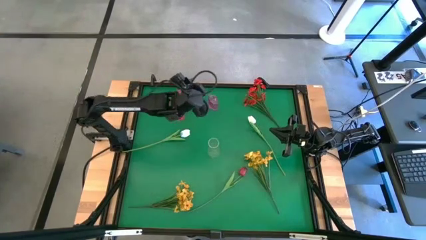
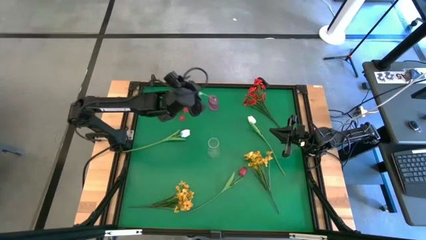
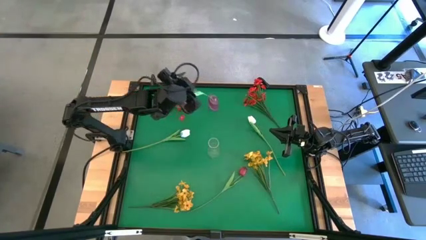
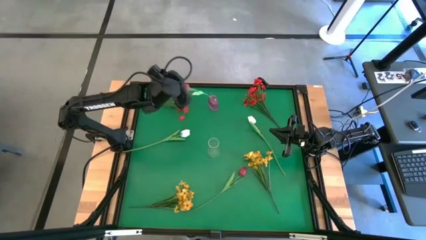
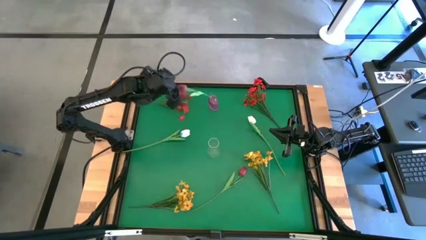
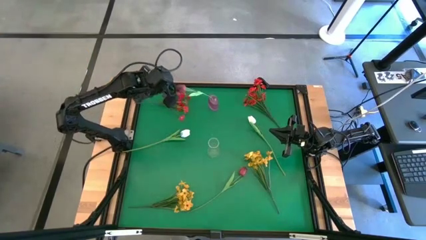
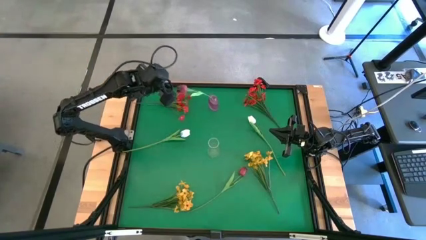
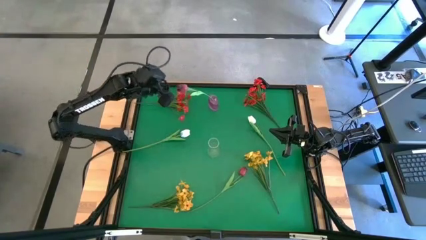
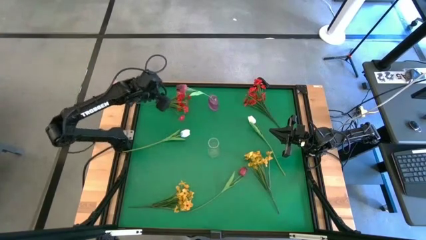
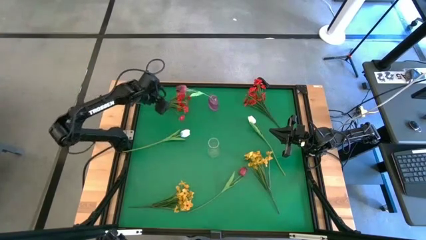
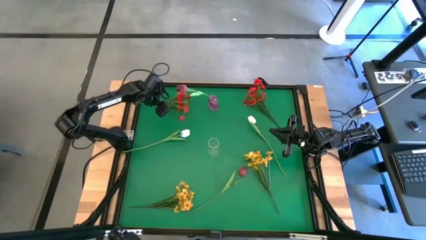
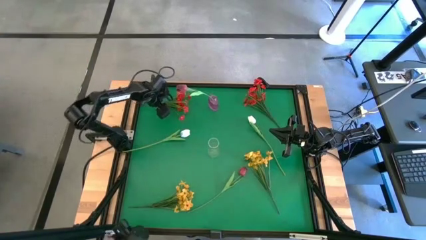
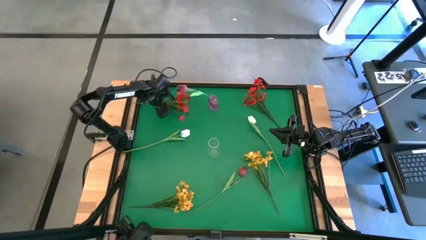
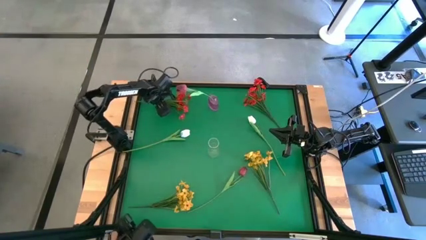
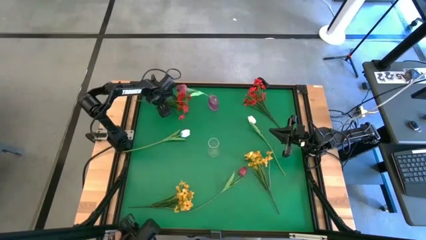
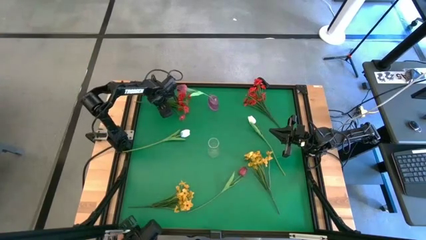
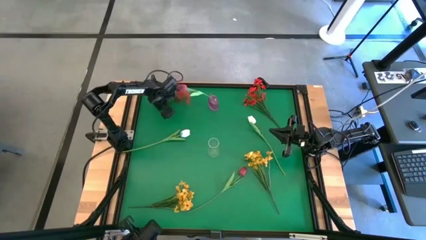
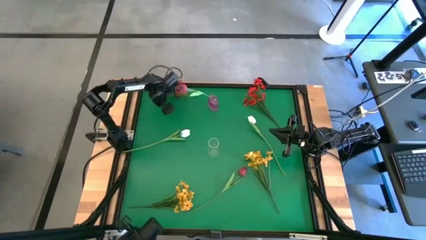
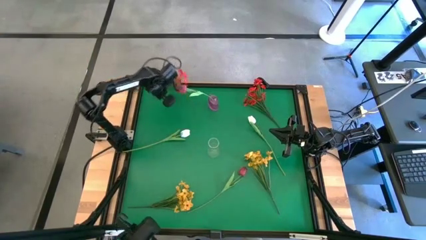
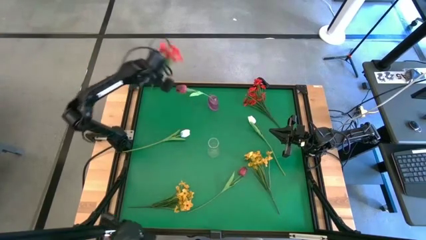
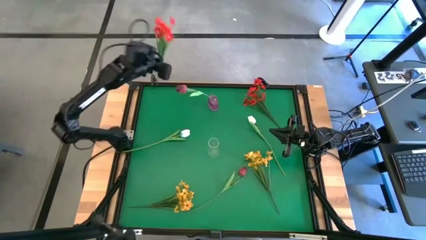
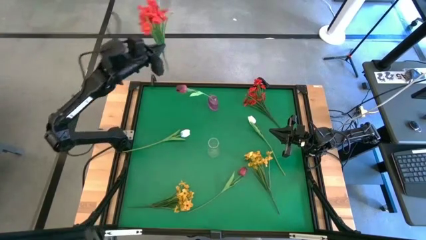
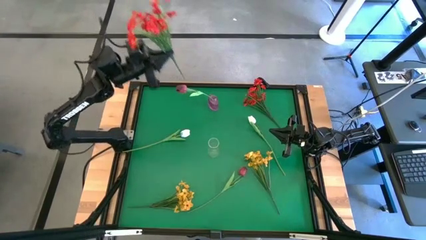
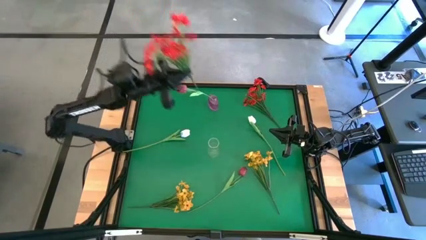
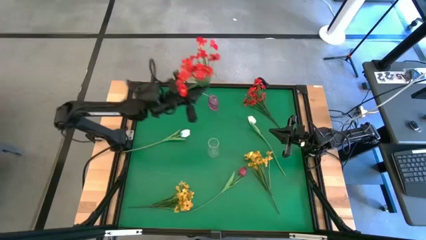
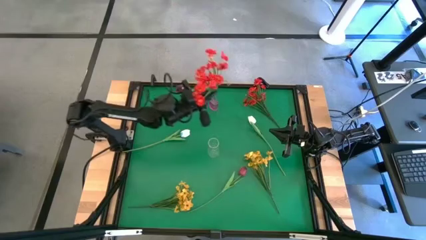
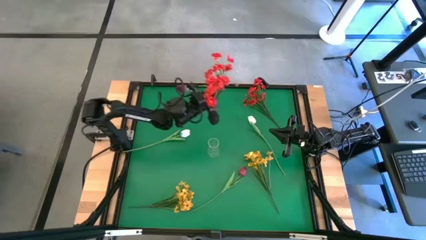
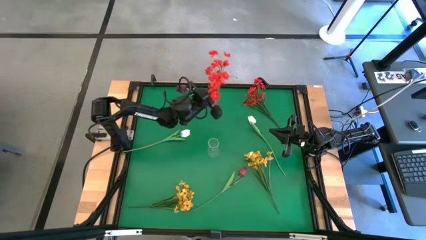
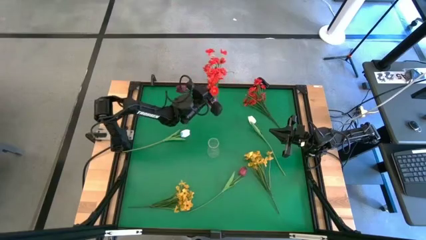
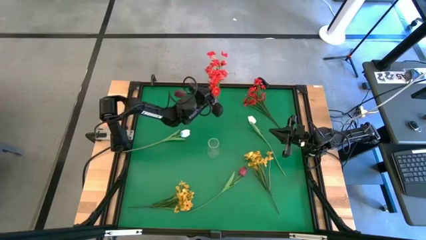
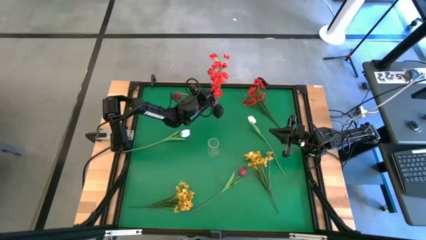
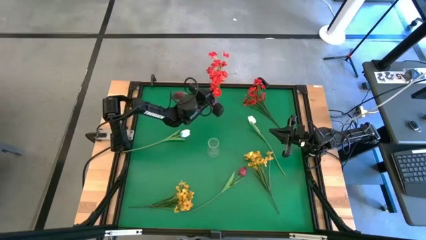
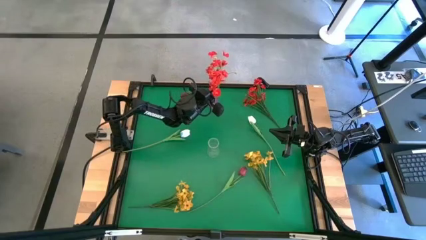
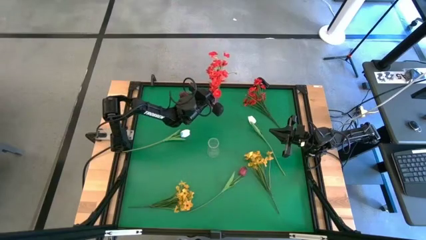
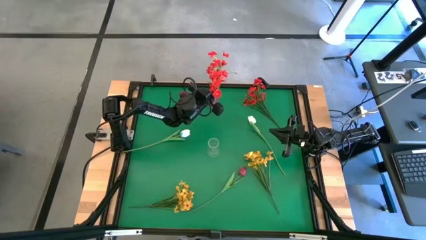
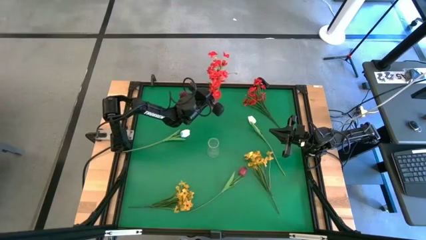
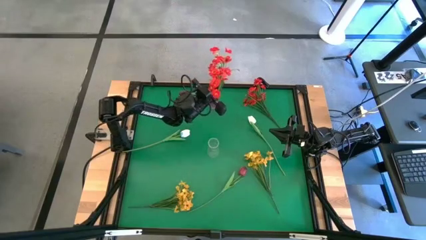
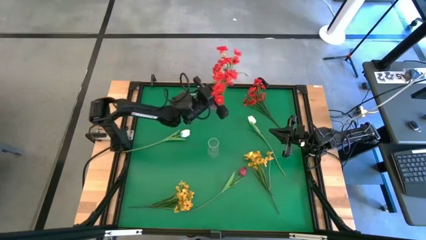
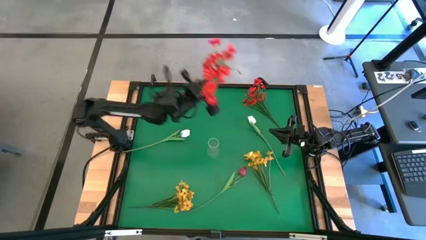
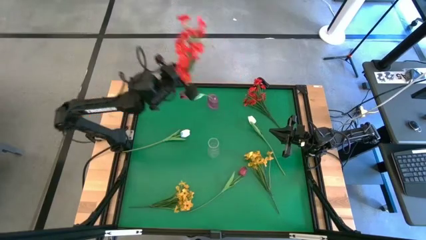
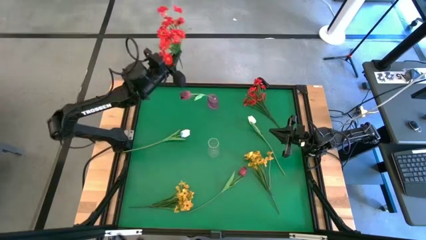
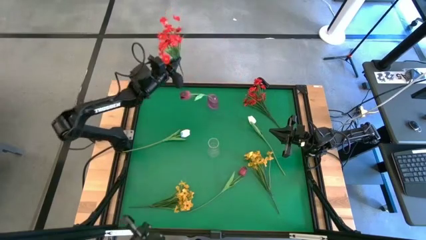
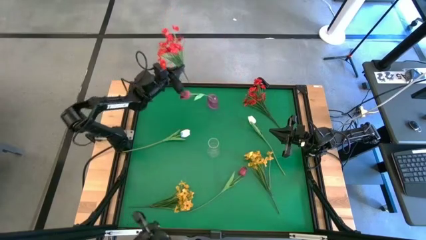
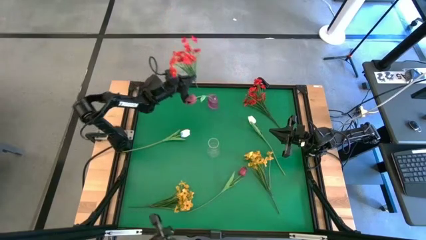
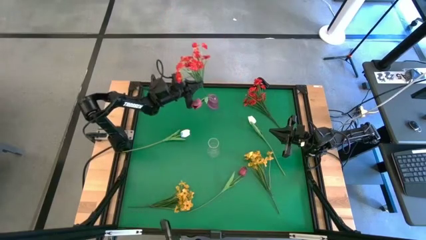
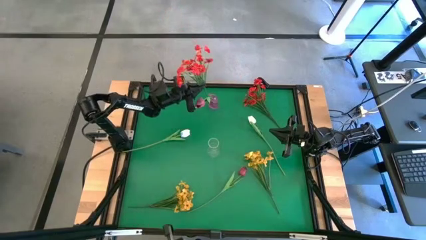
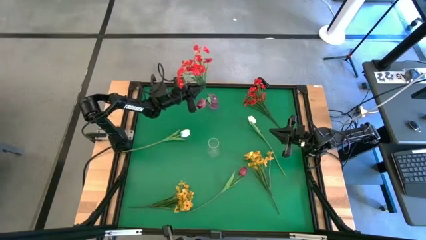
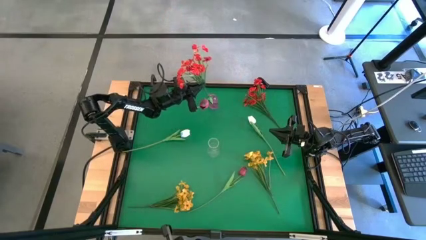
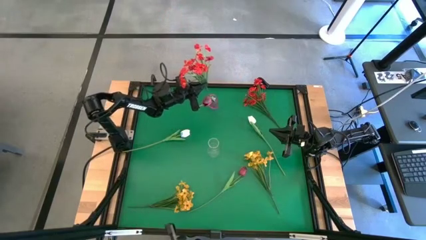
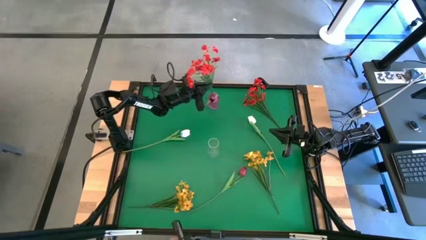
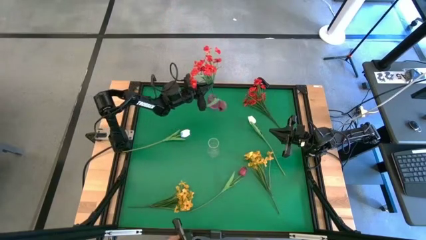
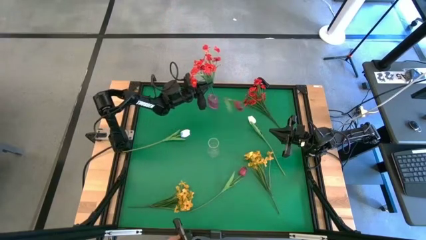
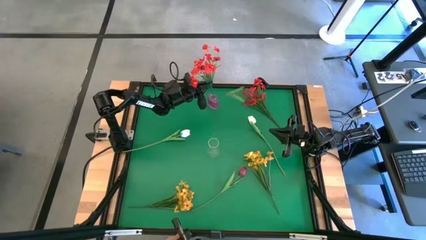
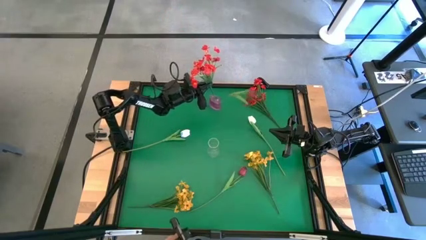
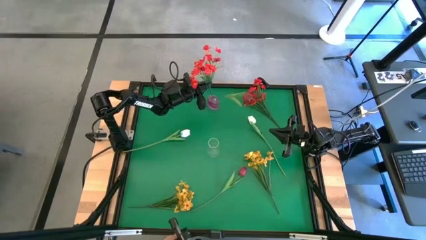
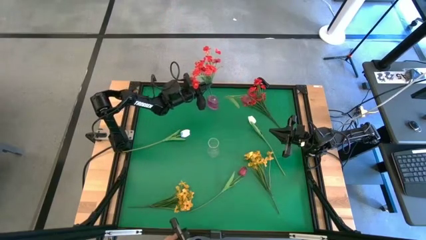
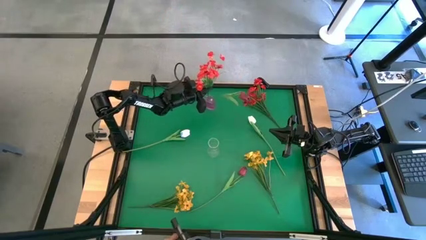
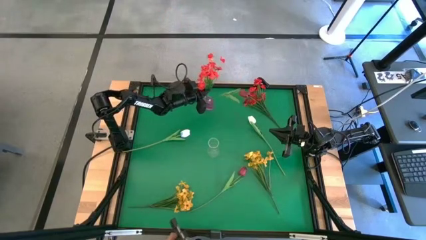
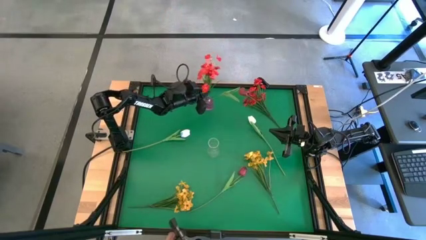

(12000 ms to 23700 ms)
Task: Sort flowers into vase by color
Put the left red flowers into the pink vase

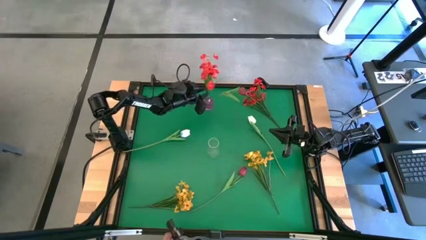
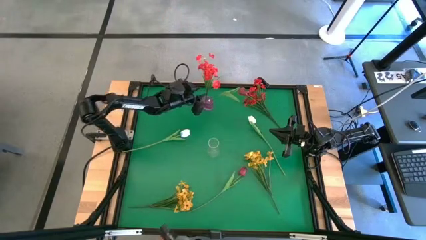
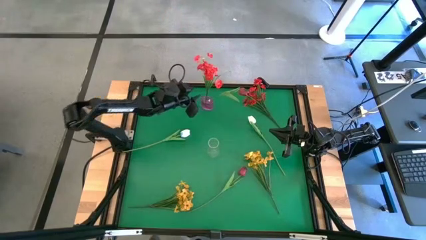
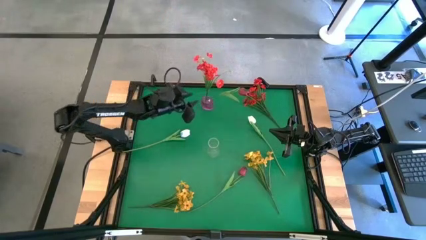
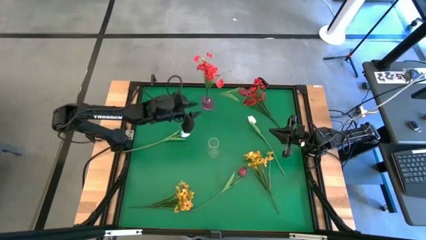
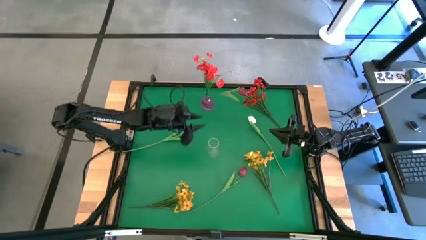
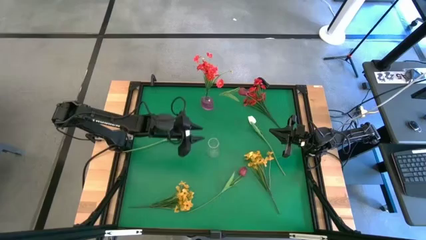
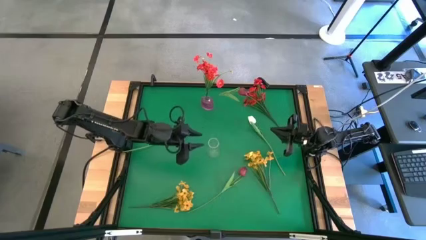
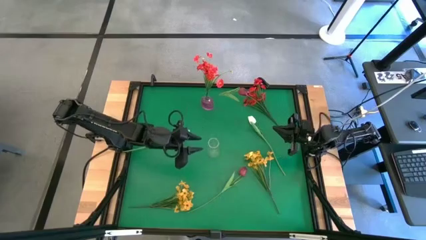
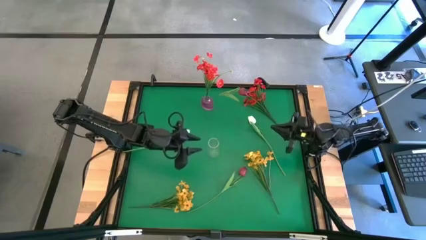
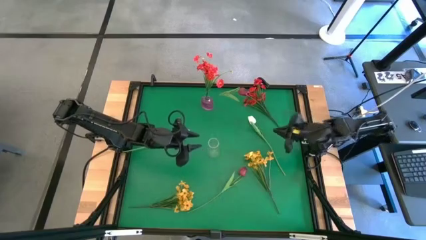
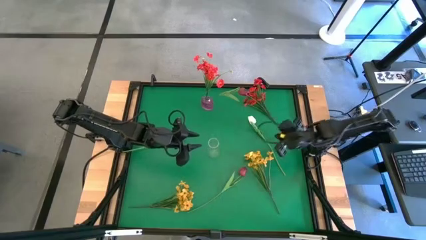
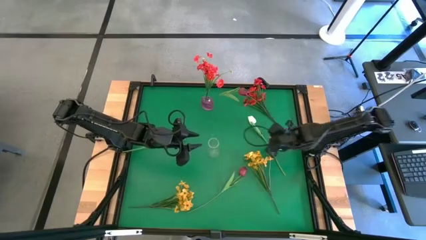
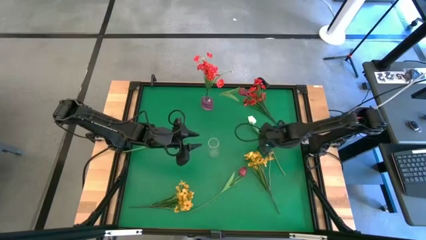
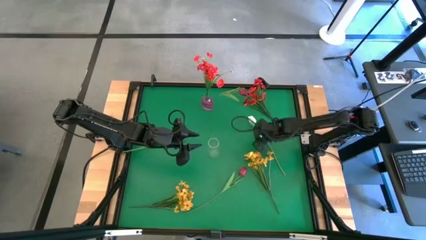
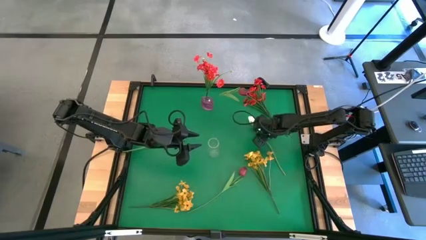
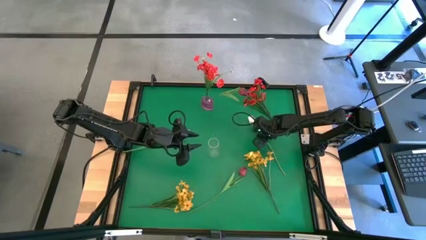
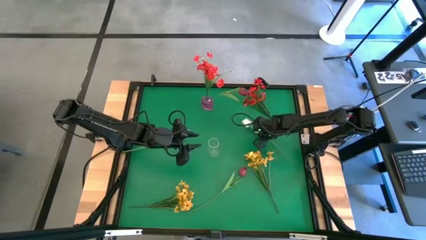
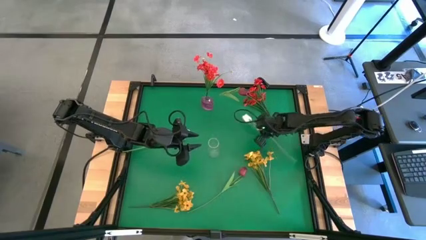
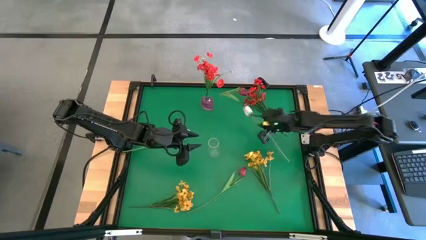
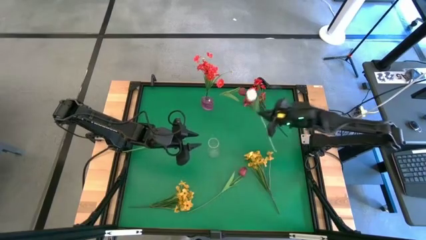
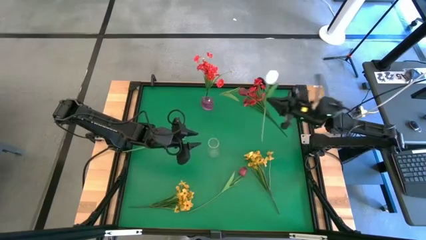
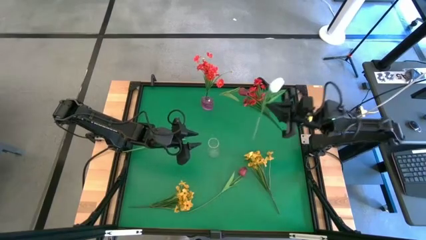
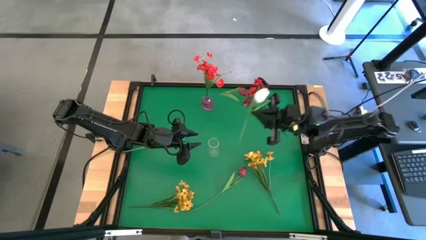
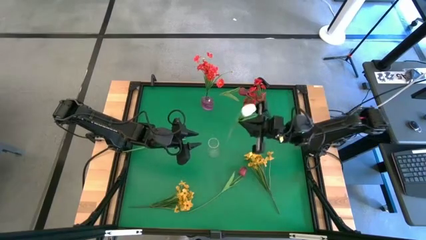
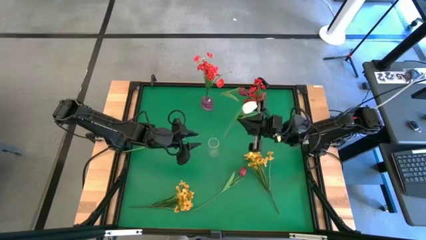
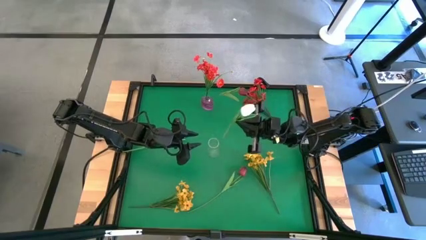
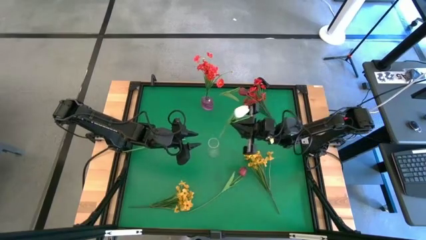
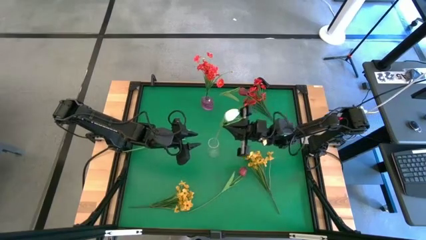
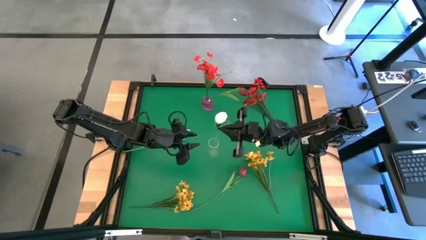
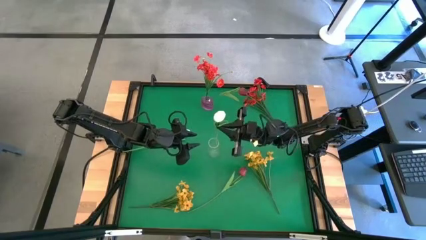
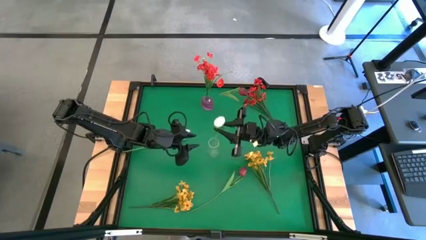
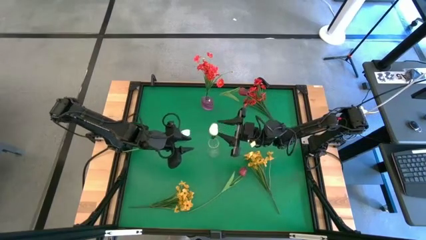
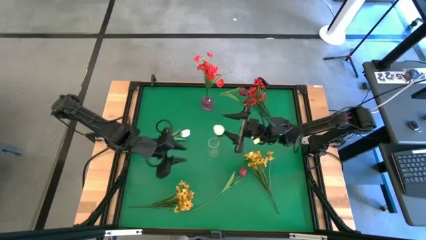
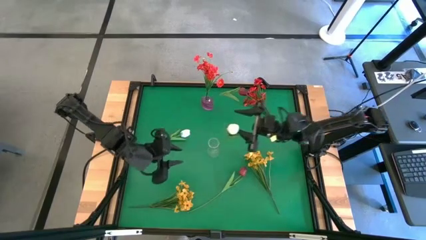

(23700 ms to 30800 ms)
Put the right white tulip into the transparent vase
